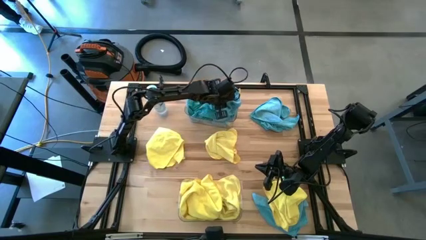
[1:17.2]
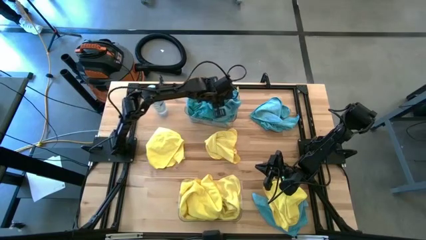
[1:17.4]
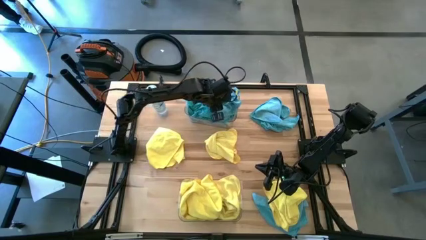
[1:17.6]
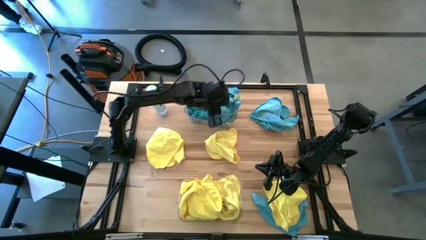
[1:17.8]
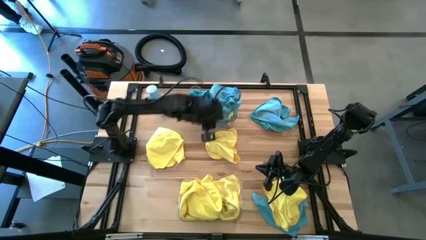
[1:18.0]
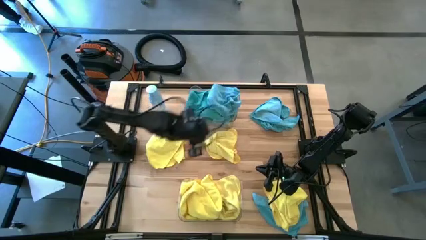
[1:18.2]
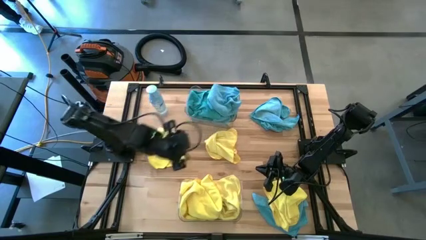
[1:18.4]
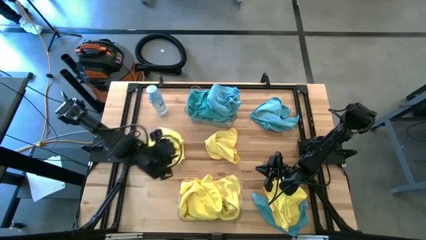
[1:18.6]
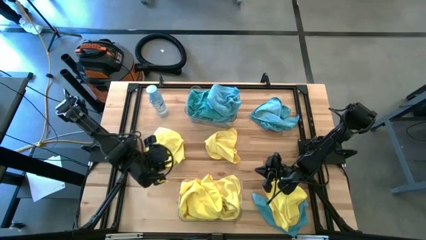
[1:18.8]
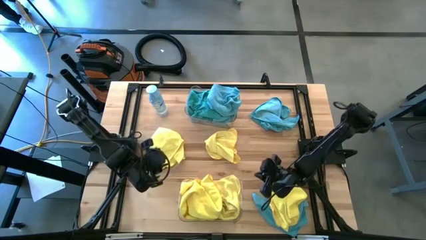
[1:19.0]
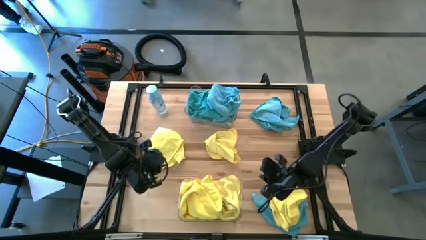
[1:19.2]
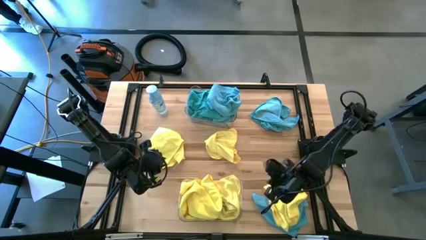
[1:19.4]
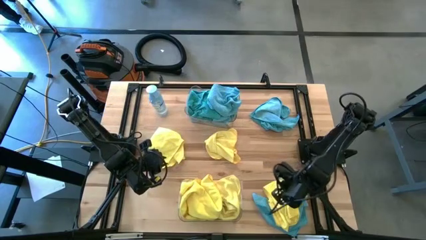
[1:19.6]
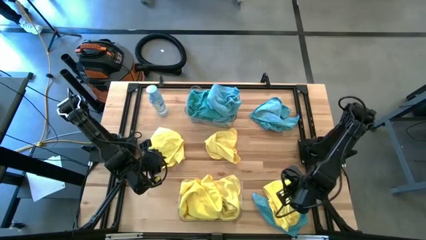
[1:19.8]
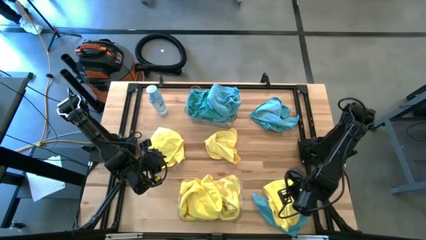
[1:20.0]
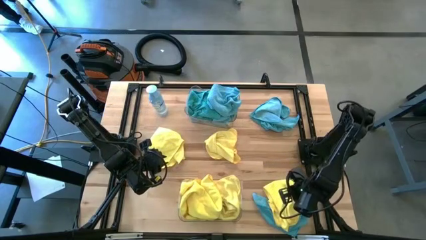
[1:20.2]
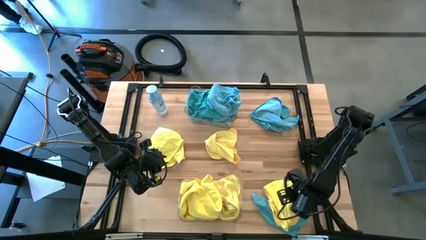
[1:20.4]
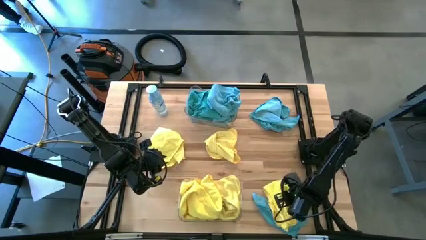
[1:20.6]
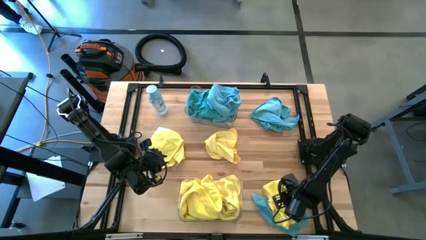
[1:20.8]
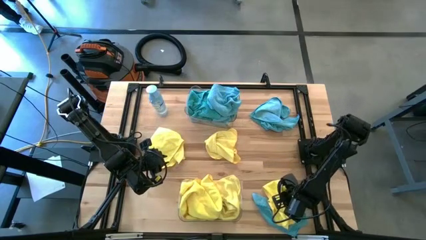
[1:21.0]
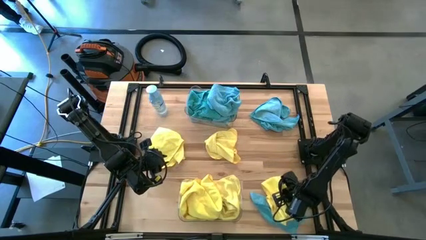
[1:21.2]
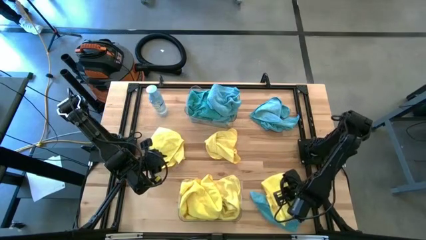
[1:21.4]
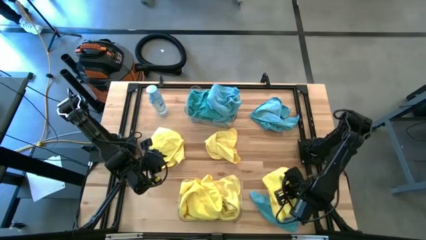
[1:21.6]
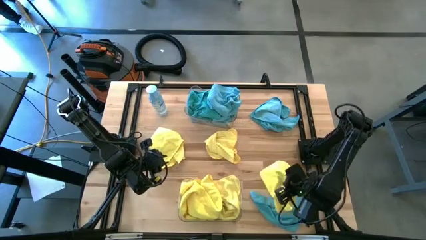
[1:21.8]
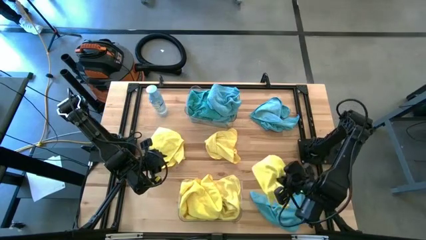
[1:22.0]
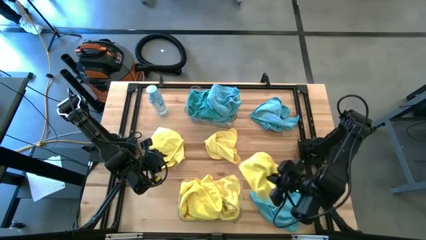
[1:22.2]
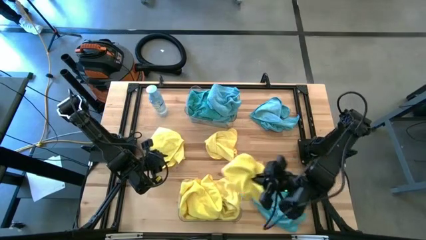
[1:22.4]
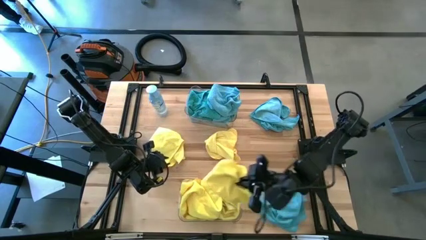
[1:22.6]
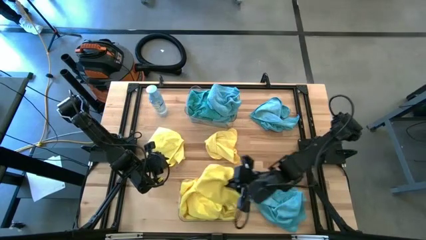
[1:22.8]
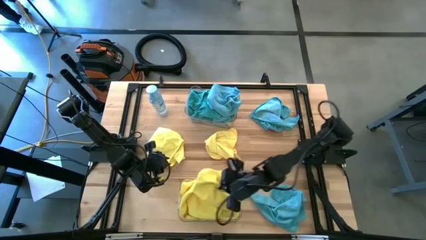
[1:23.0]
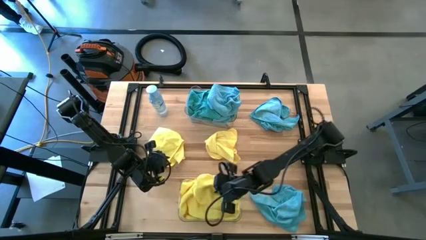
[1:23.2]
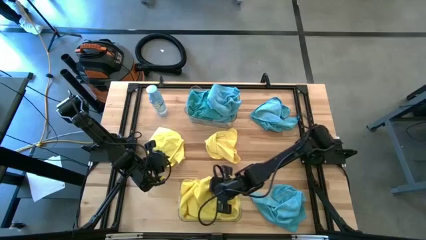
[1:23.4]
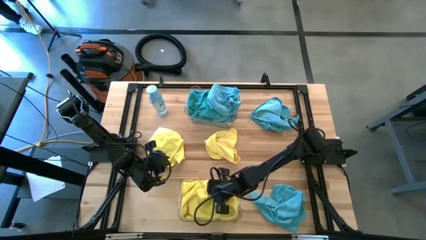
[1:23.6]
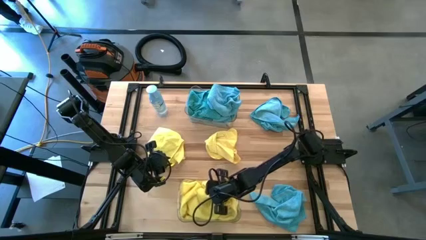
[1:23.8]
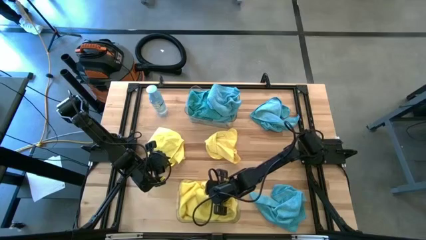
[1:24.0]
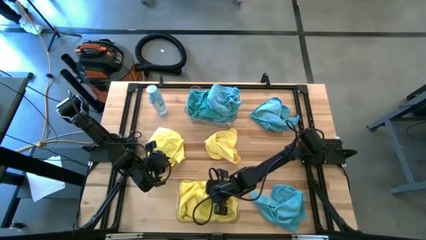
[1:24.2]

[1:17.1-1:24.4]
Task: Sort microfiber towel by color & place in baskets
Put the yellow towel into the bottom transparent bin

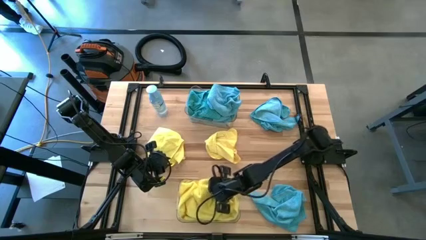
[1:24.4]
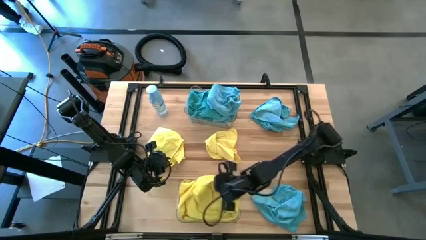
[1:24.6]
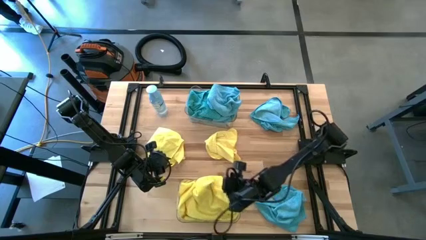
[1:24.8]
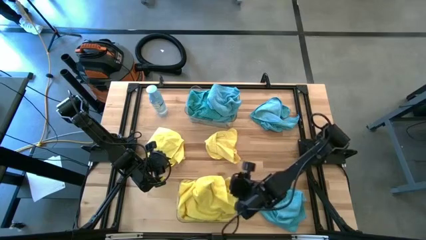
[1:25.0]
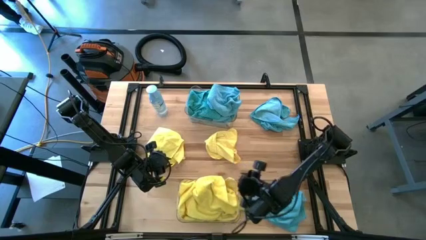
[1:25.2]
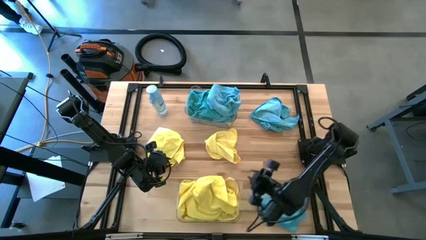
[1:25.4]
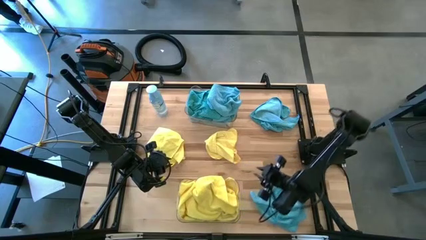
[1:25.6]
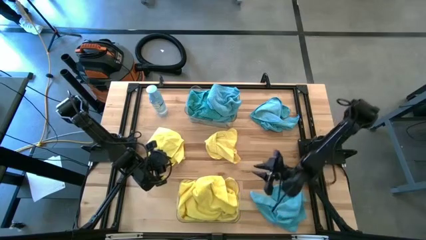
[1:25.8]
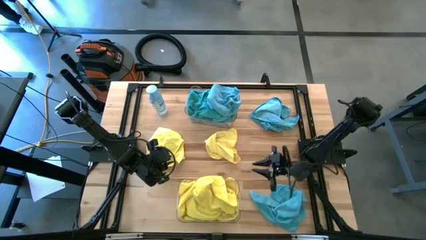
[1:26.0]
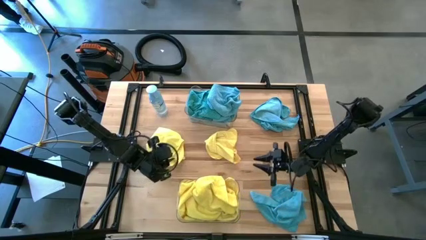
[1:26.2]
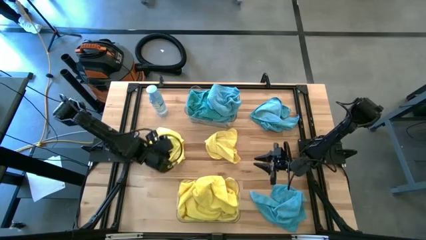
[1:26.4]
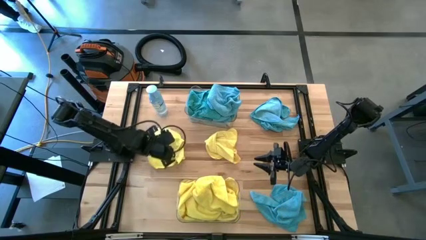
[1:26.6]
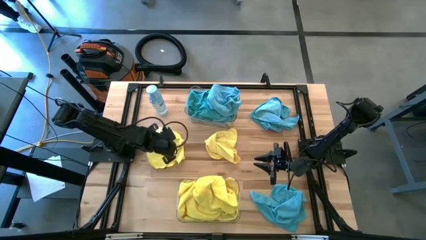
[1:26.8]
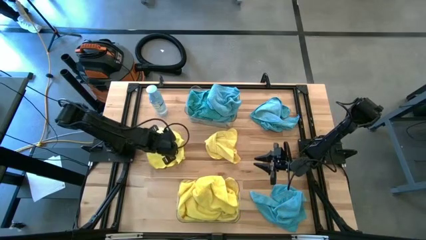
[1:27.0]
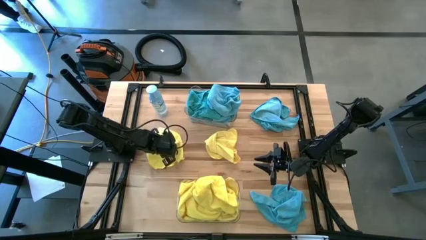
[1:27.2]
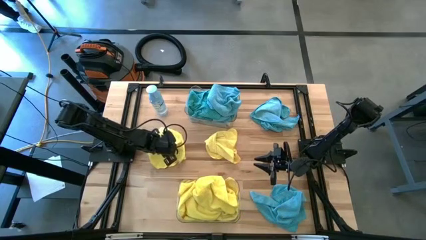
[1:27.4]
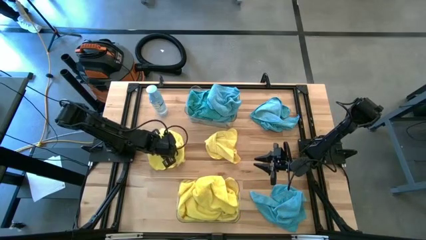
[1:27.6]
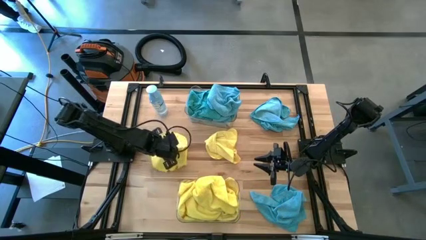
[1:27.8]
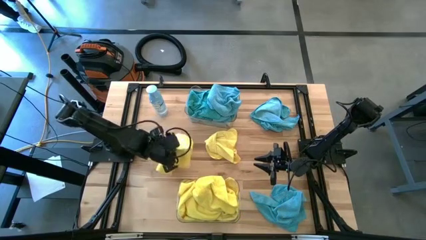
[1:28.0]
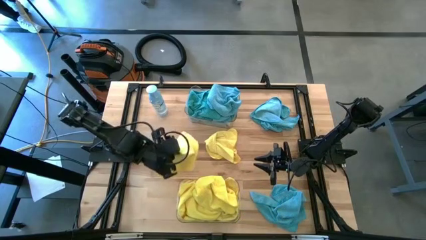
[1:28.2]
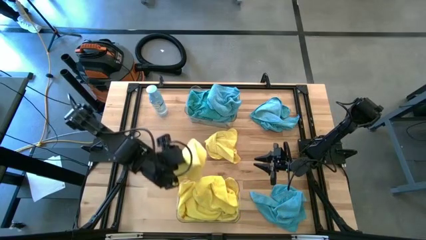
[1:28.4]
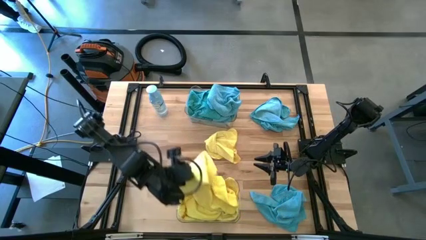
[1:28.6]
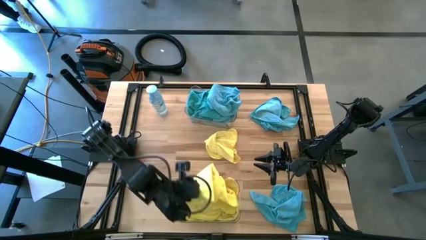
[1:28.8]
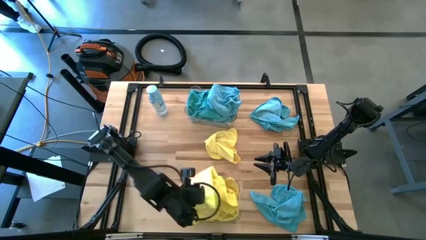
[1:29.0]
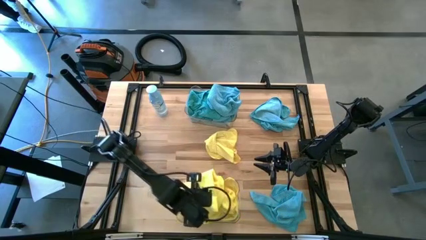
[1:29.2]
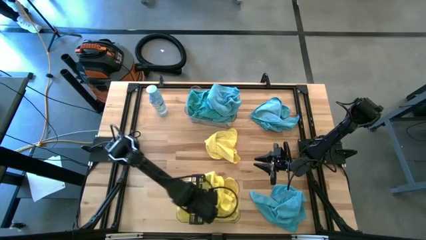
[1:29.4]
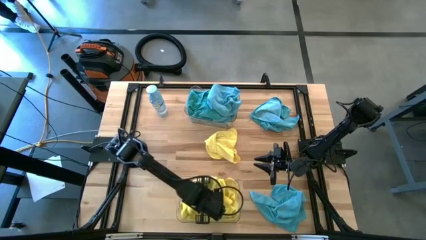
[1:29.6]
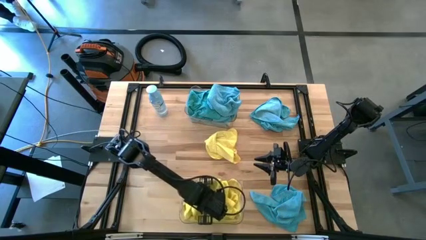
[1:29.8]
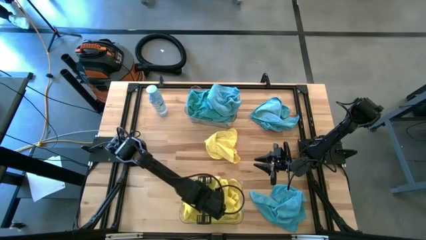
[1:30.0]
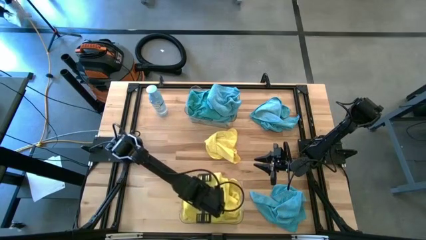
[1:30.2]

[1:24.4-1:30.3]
Put the yellow towel into the bottom transparent bin

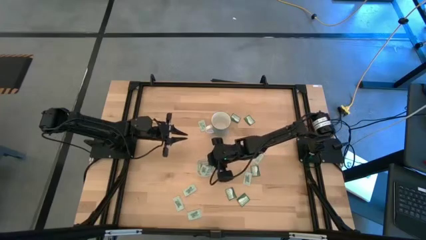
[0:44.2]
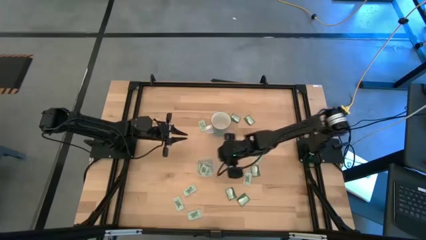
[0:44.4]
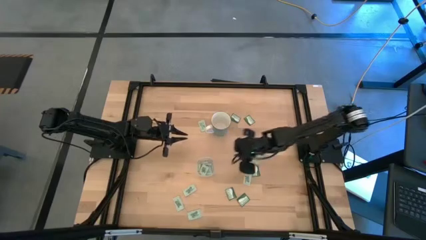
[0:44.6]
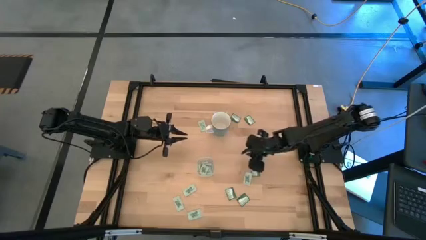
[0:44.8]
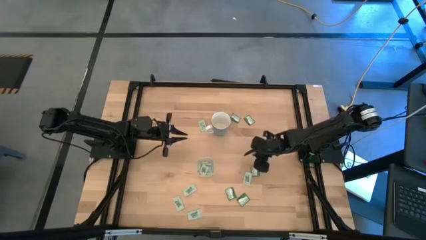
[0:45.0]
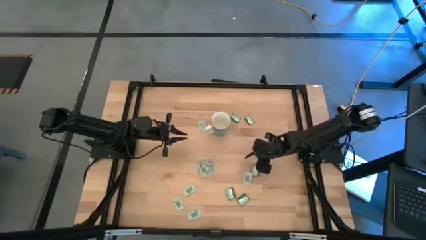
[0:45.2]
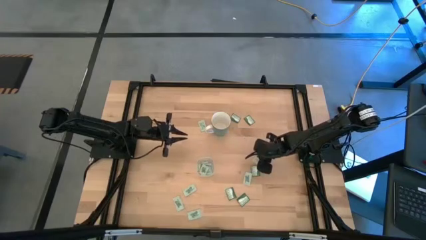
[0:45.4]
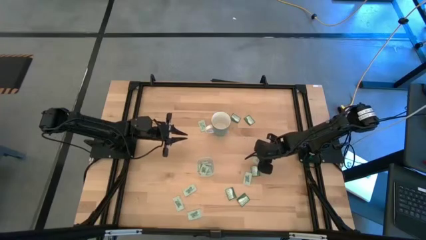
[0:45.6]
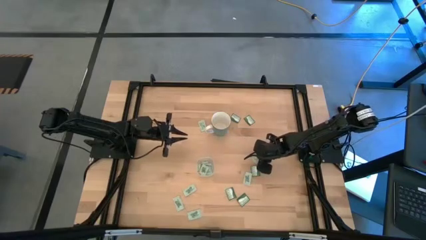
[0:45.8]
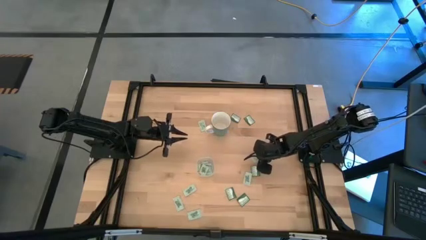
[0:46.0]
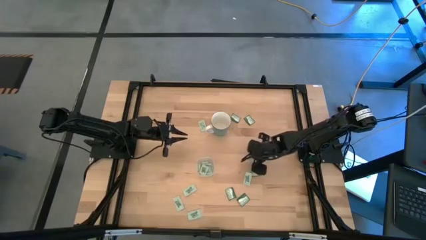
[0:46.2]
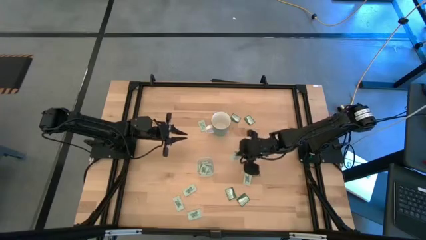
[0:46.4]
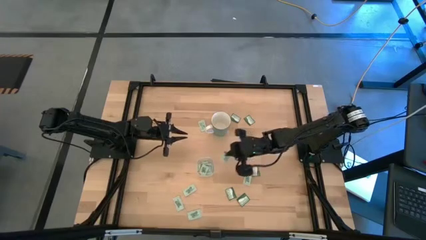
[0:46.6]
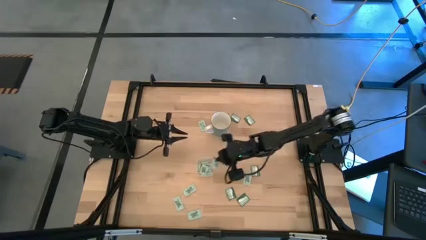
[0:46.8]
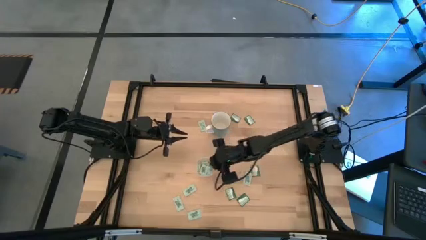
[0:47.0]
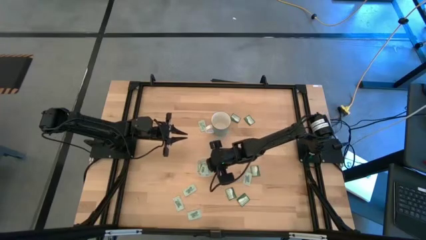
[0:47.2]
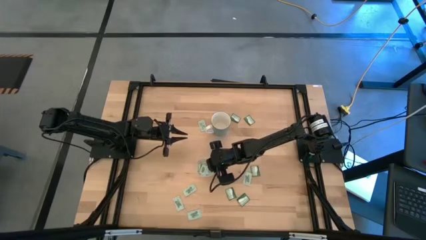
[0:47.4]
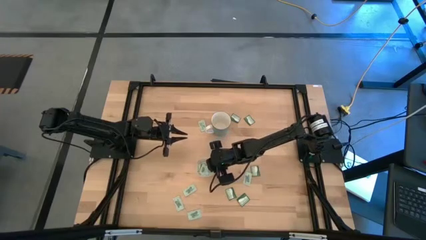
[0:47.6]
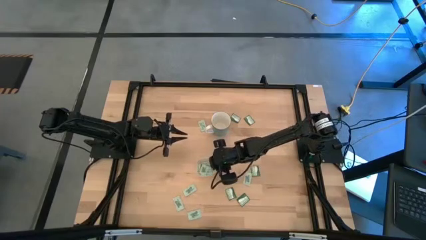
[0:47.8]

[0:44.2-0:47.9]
Task: Pick and place Stevia / Truvia into bins
Put the white stevia packet into the transparent bin
